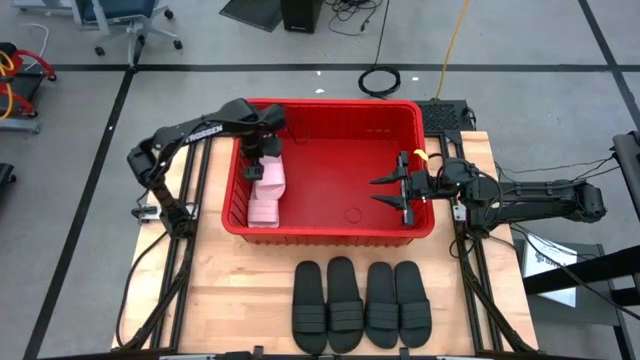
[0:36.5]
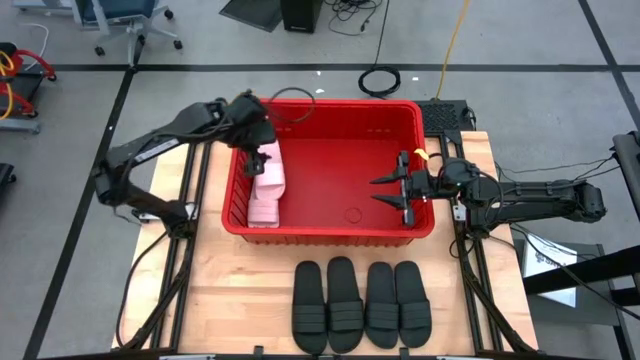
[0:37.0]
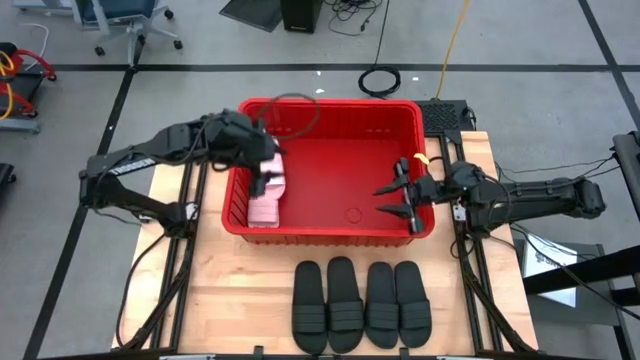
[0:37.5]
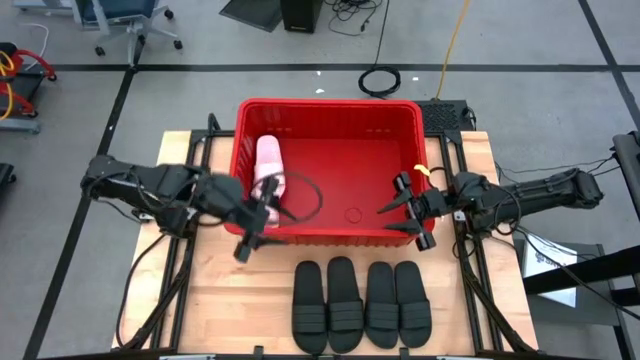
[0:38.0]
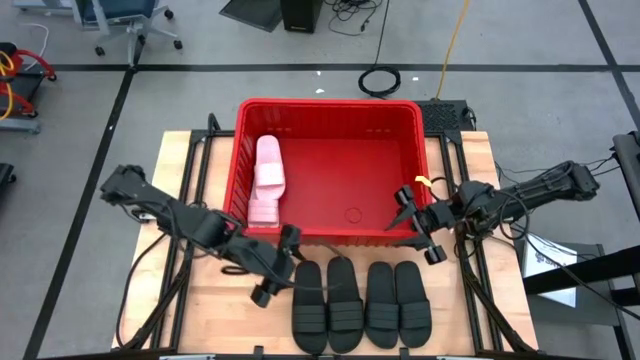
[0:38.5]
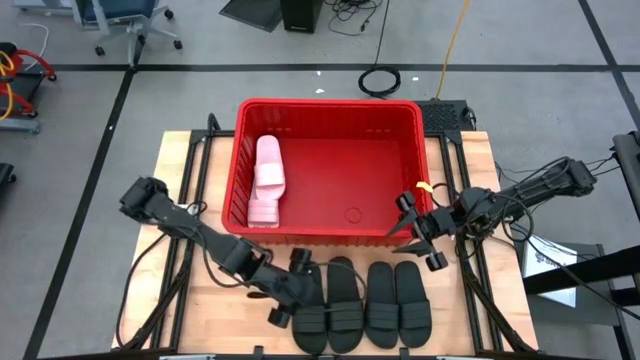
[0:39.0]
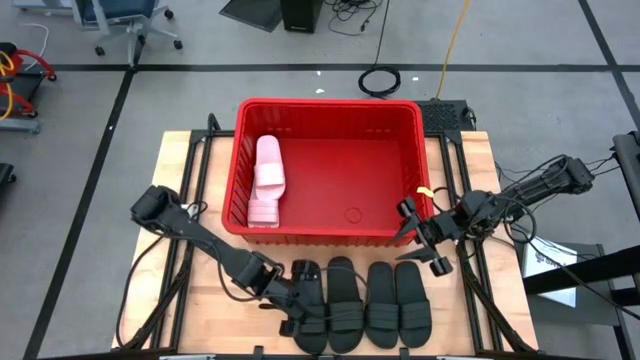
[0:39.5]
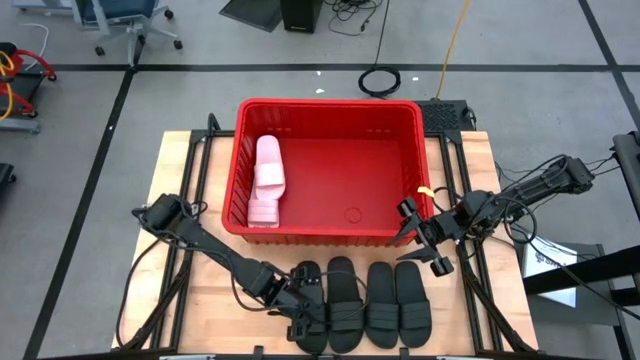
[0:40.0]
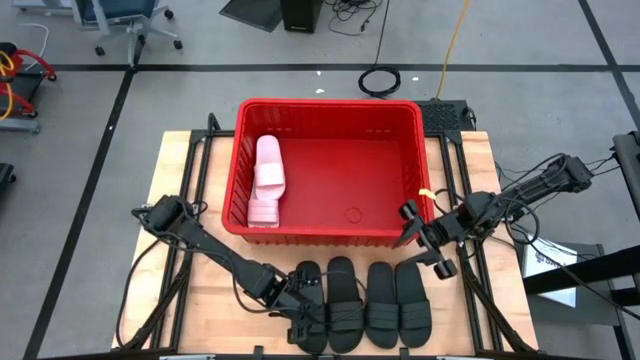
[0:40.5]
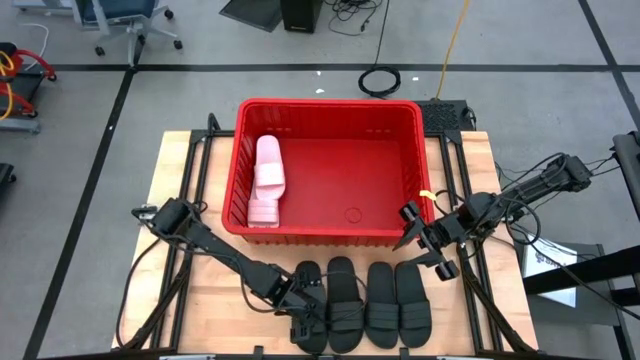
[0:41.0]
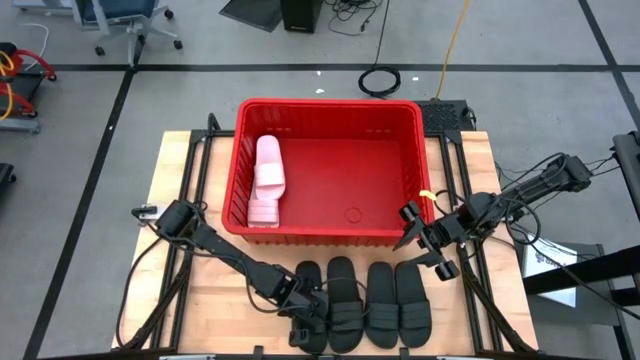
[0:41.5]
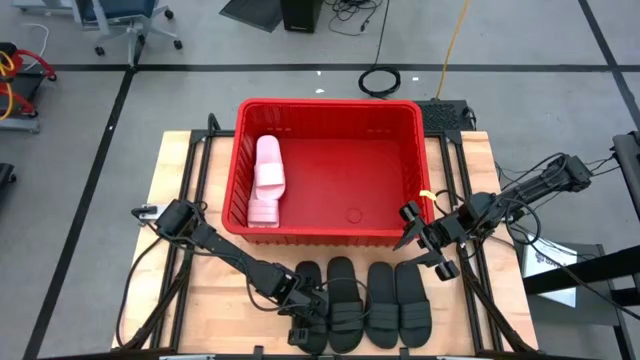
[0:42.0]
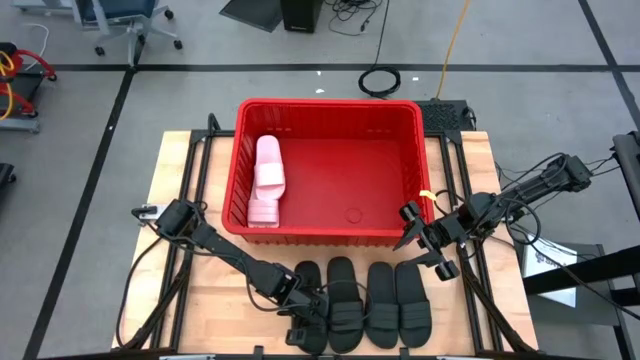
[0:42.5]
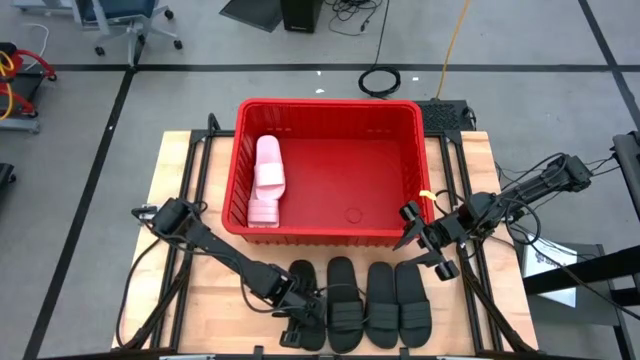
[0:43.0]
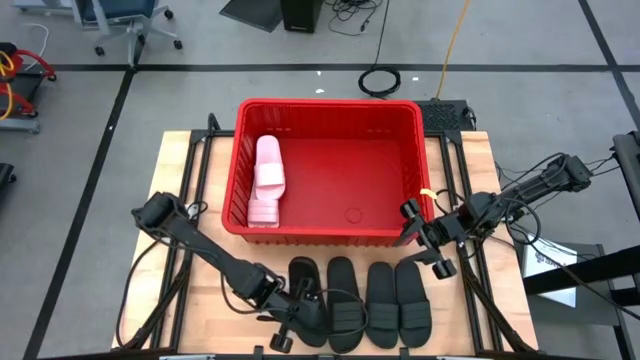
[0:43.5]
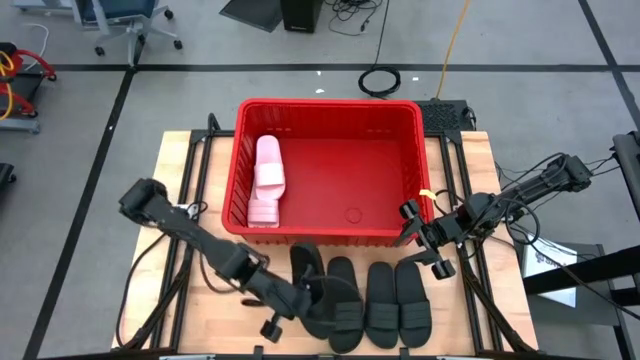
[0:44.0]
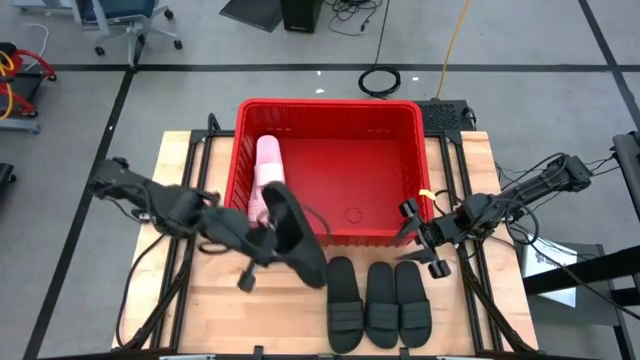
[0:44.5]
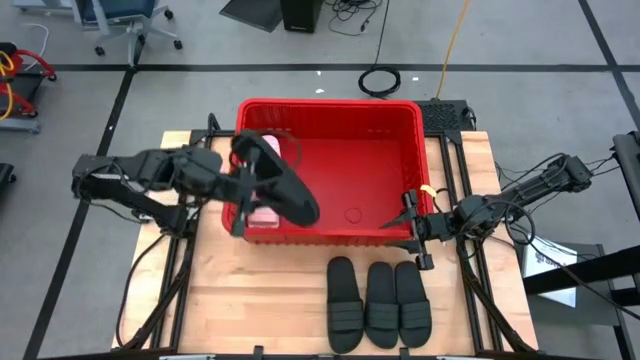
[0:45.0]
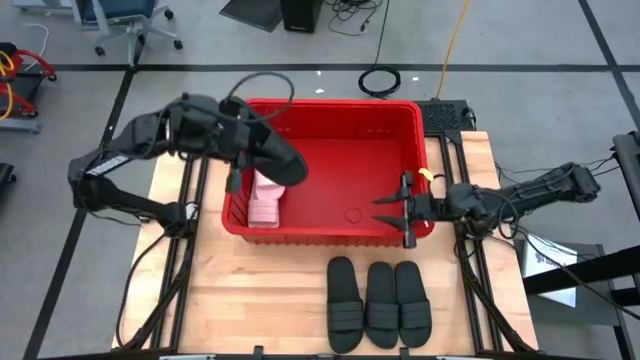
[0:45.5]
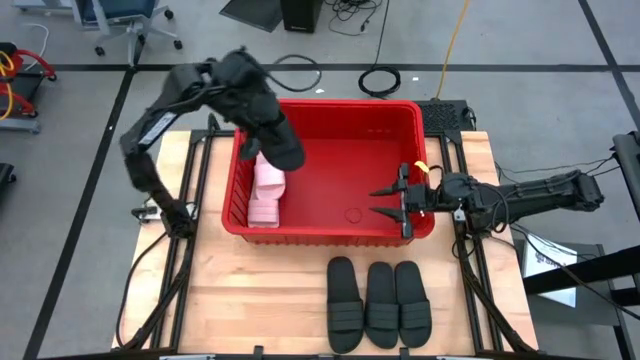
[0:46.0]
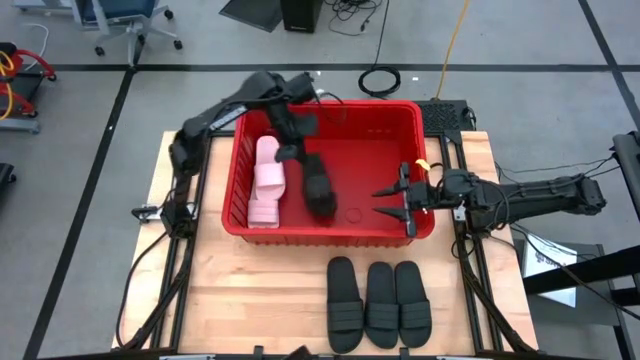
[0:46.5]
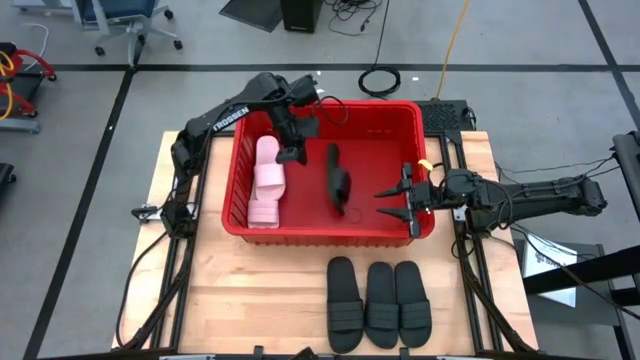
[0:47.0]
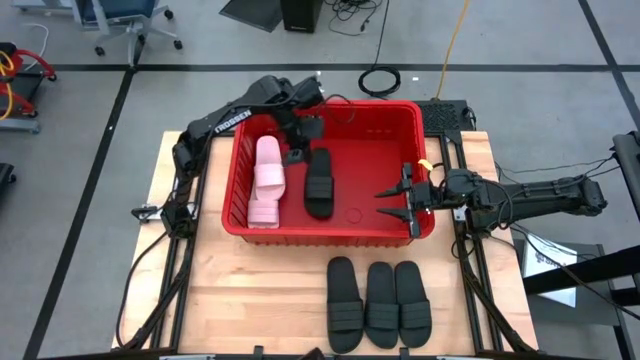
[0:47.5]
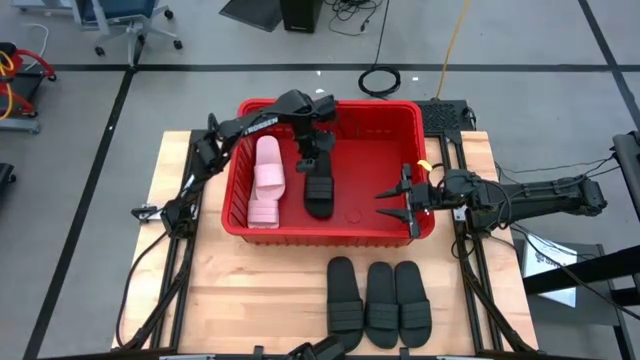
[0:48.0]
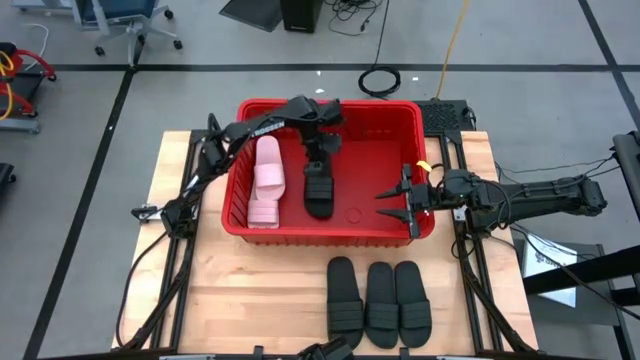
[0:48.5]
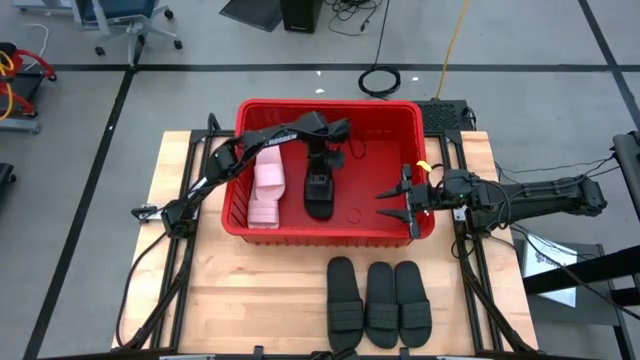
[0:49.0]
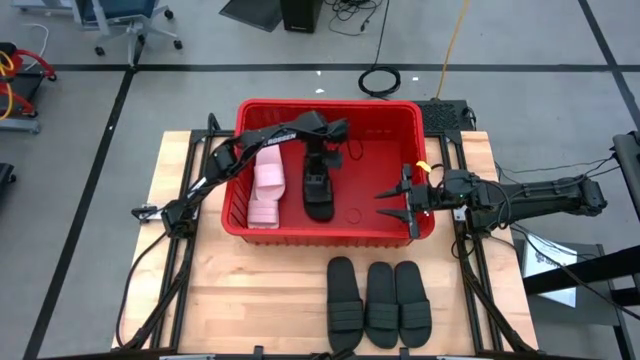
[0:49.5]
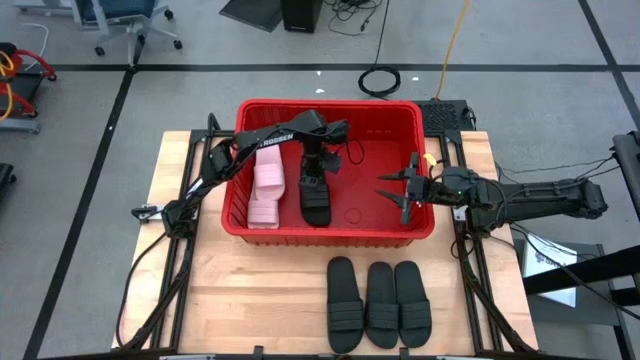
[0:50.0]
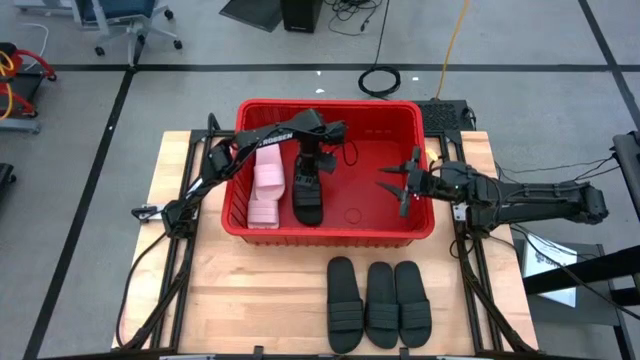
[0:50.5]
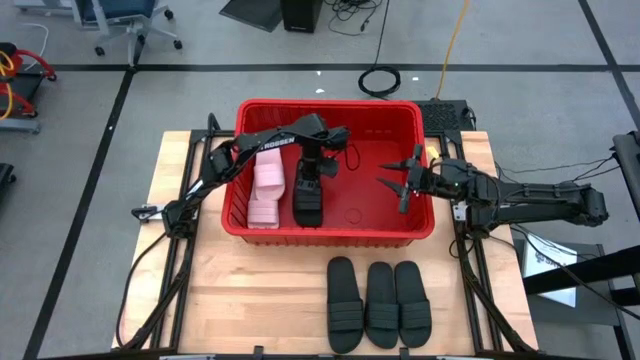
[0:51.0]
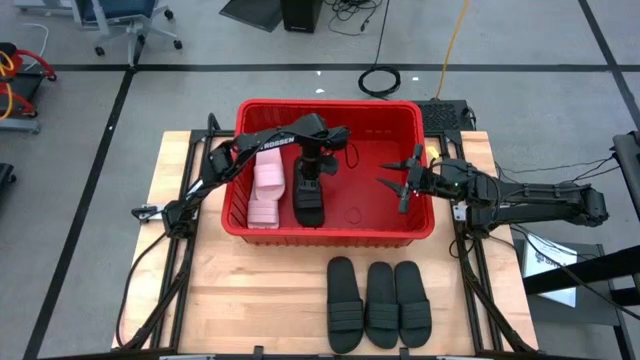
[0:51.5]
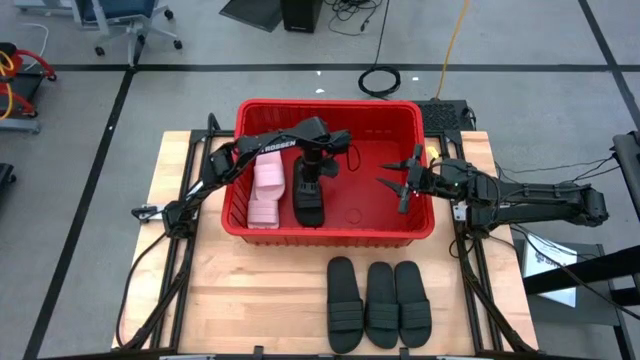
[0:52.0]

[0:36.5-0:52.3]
Task: Pick and place slides into bin
Put the black slide into the red bin

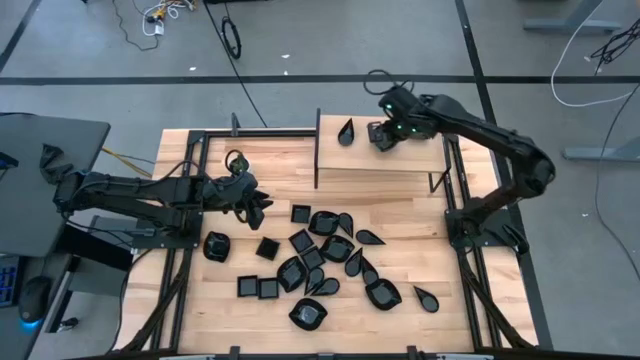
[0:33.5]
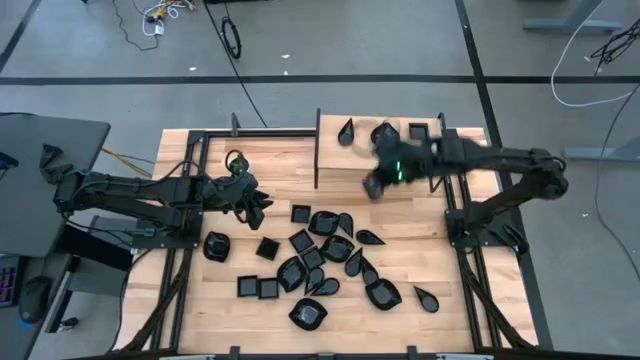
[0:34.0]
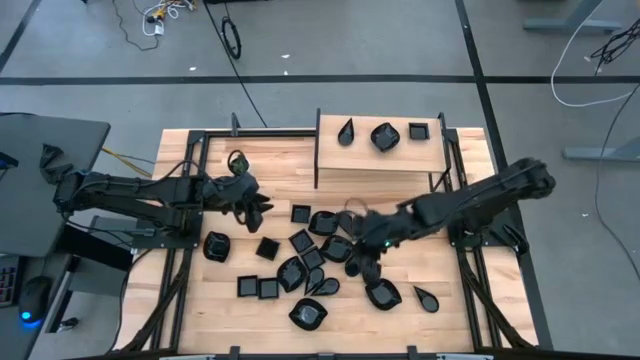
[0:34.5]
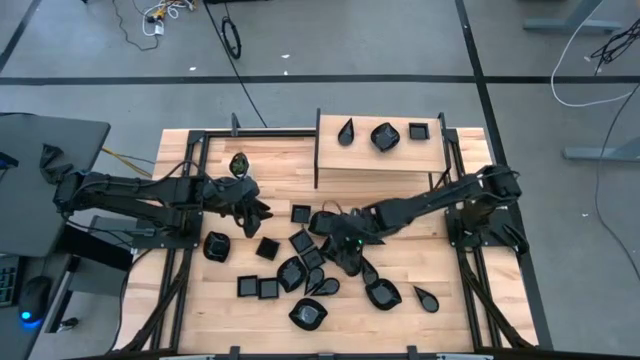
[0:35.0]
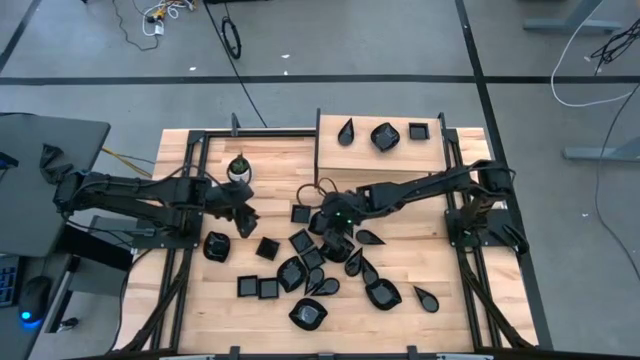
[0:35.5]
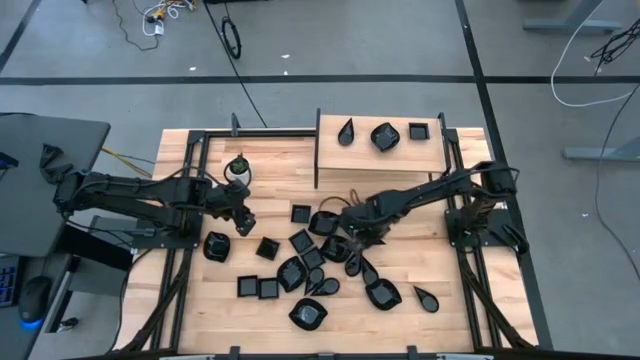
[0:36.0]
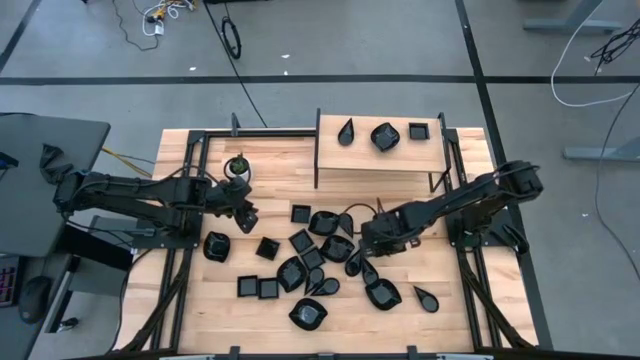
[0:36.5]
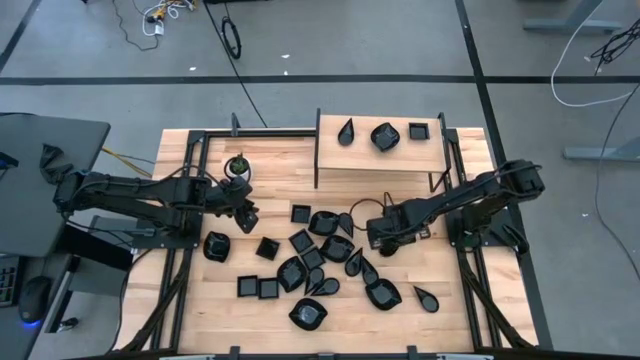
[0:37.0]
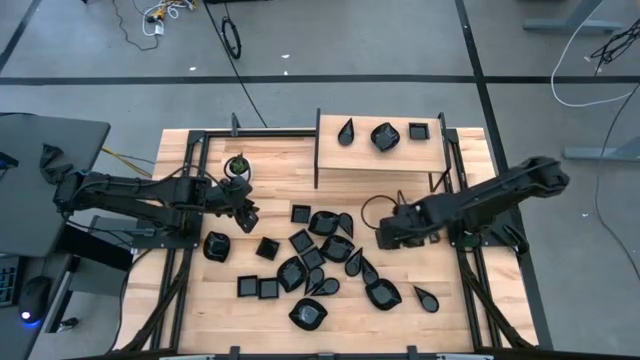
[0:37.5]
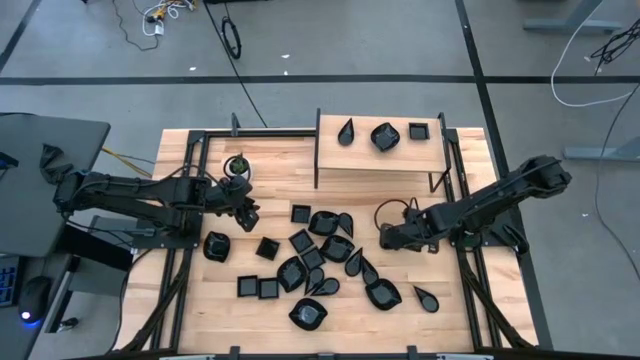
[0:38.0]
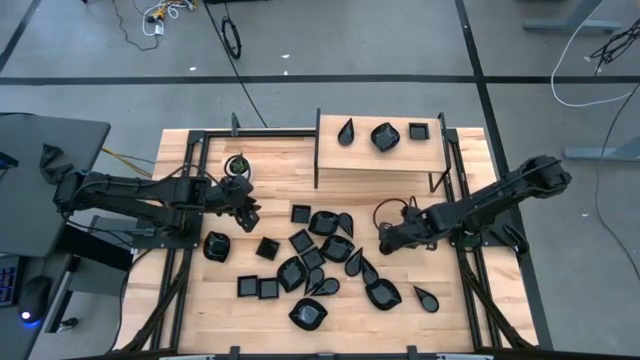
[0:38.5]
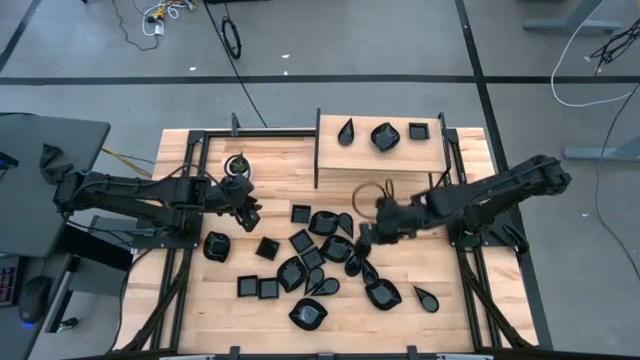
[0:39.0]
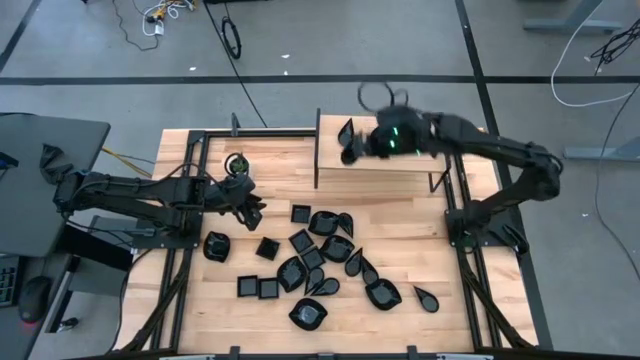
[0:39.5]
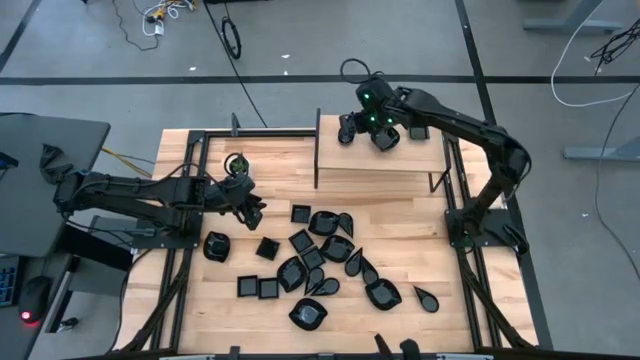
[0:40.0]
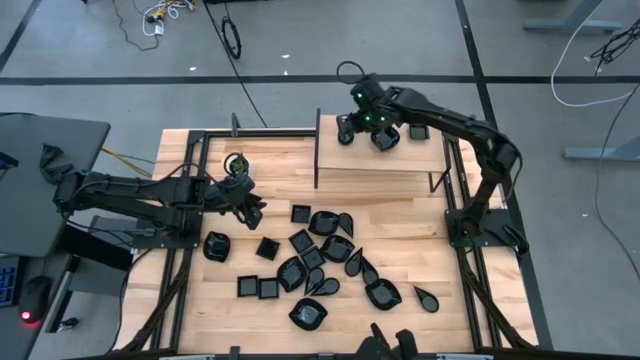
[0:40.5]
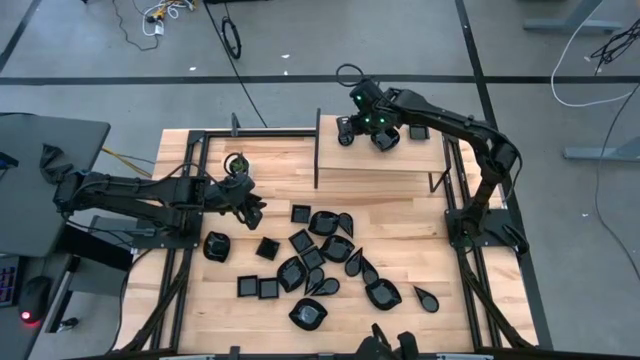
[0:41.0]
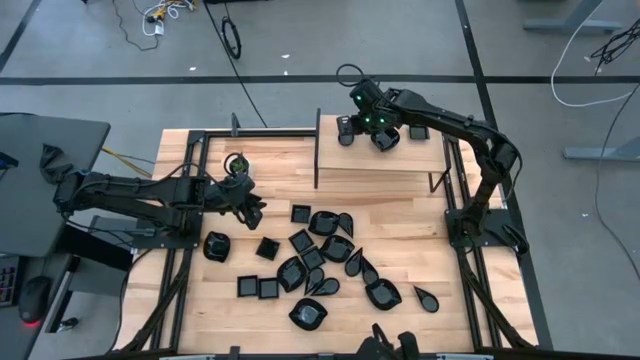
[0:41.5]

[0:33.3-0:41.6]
Task: Pick & Place Mini shaped plates
Stack the drop-shaped plate on top of the drop-shaped plate on the shelf
